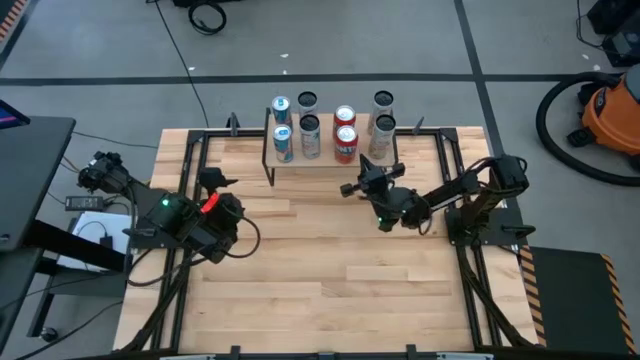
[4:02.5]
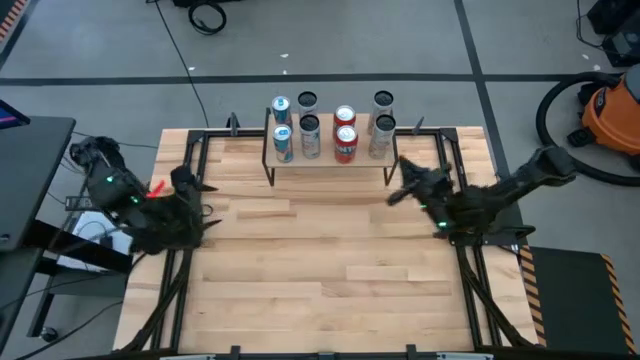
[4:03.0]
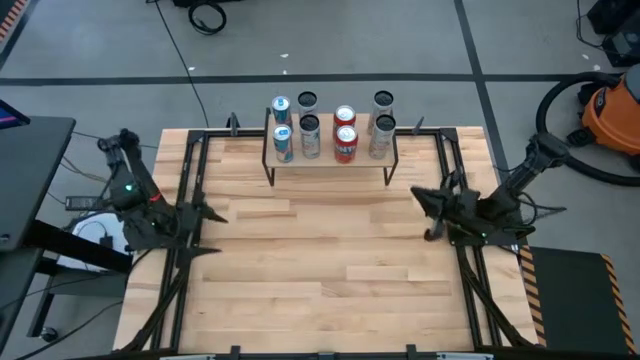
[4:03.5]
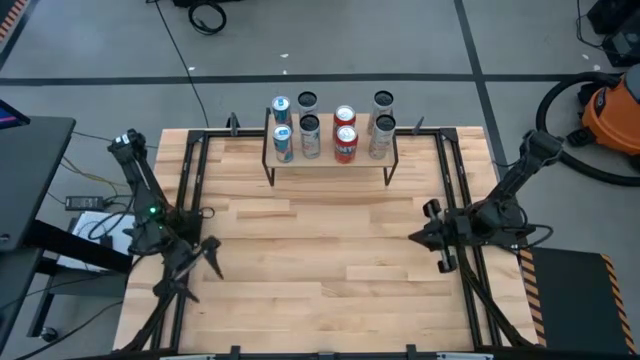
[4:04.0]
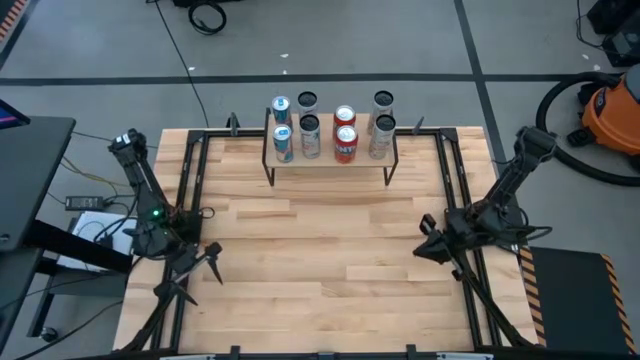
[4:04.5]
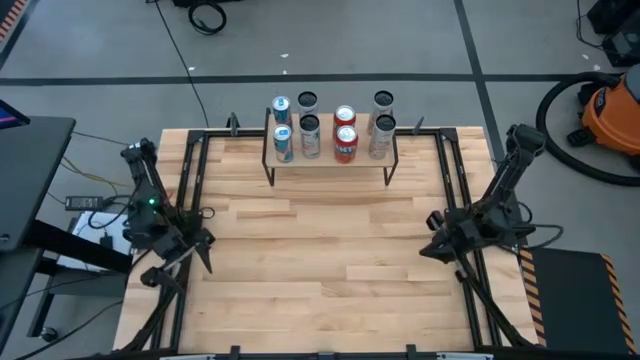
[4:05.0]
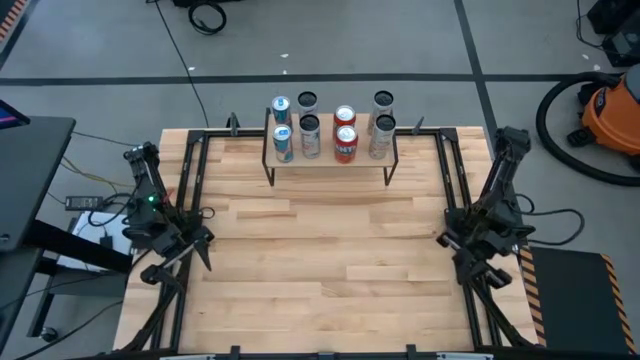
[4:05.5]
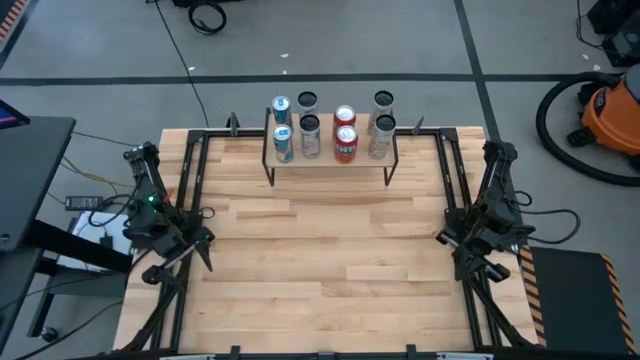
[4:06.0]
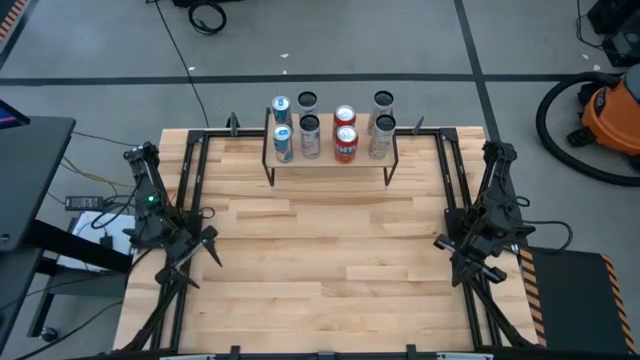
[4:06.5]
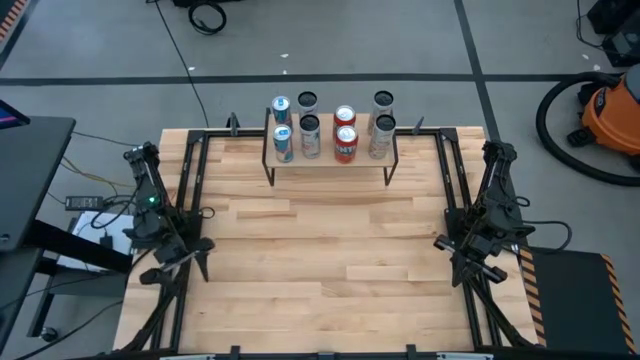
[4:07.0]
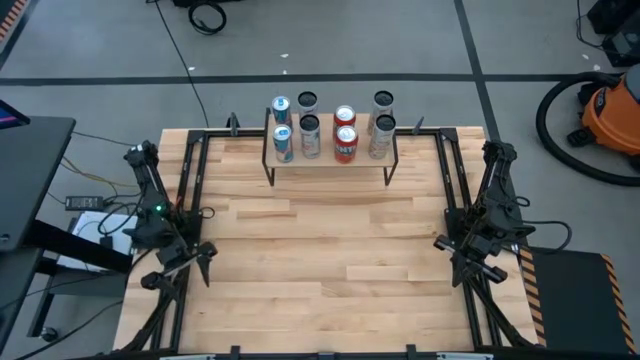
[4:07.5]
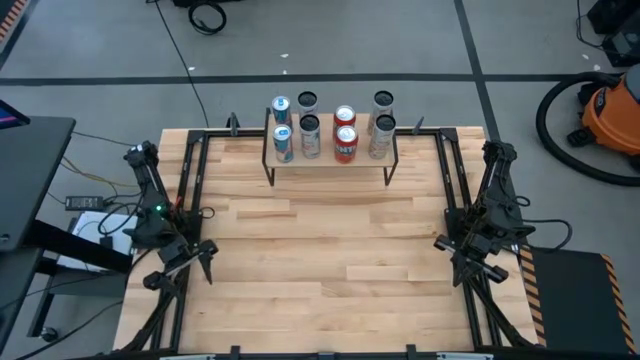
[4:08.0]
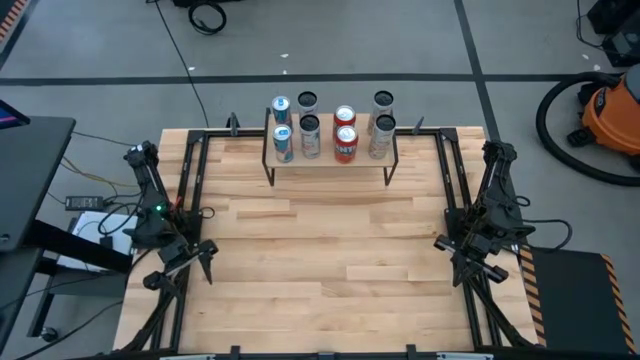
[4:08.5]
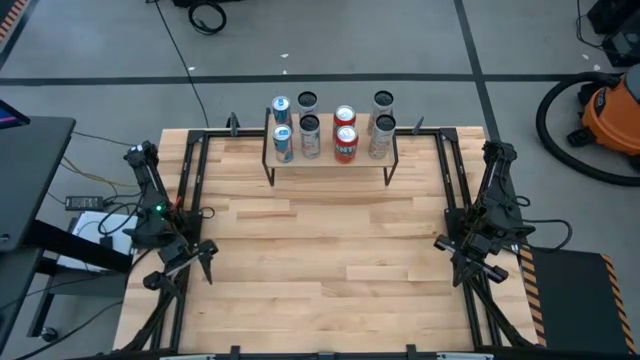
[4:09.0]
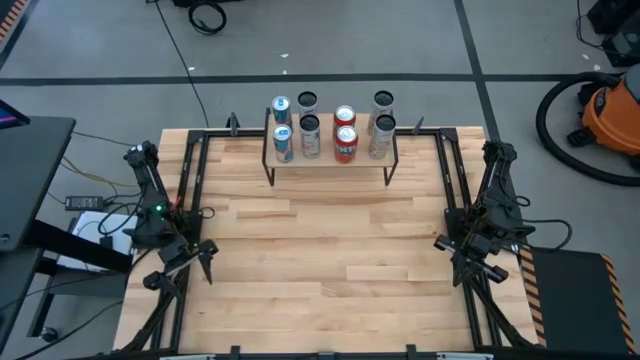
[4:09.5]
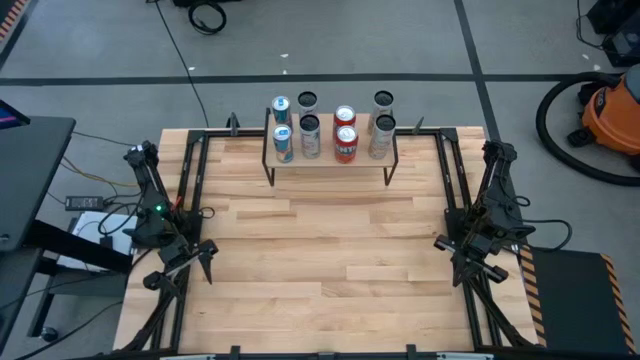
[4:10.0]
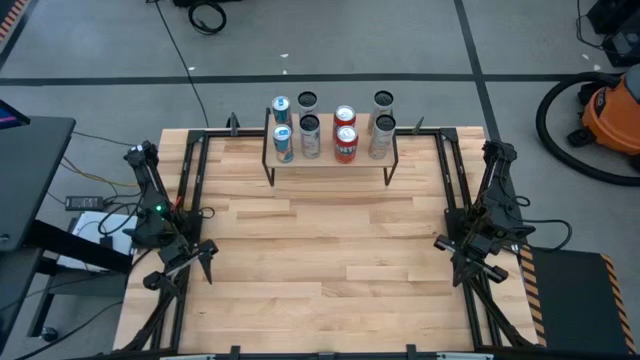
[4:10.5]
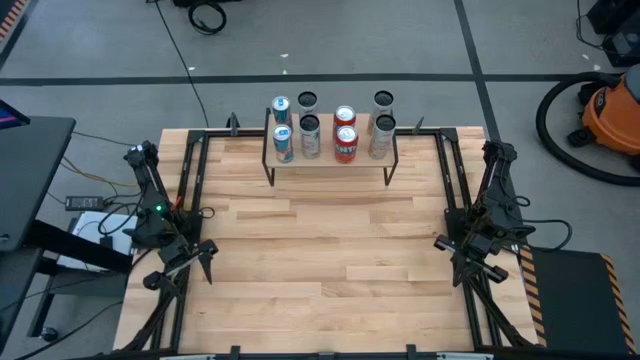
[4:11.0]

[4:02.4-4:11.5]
Task: Place canned beverage on shelf
Return to Home Position

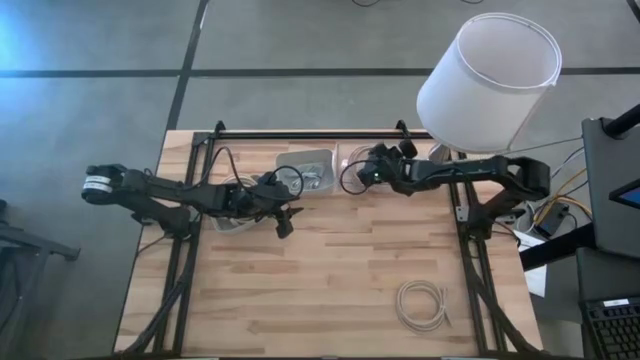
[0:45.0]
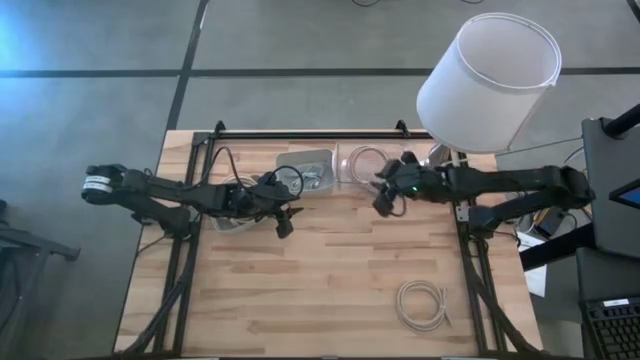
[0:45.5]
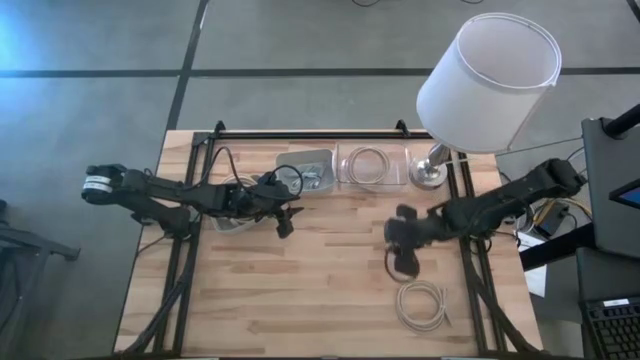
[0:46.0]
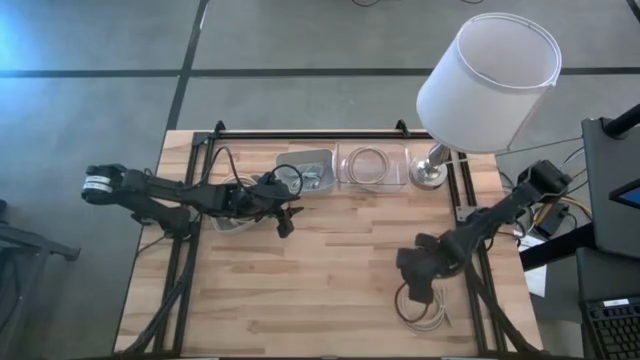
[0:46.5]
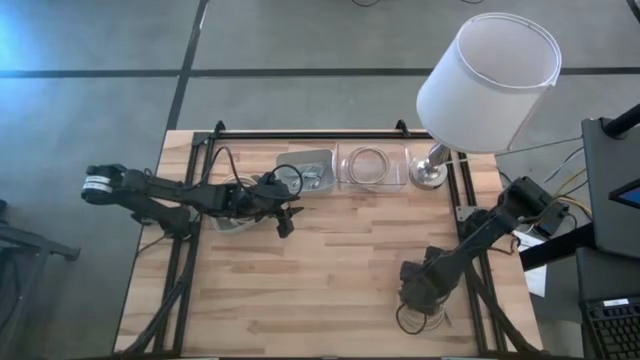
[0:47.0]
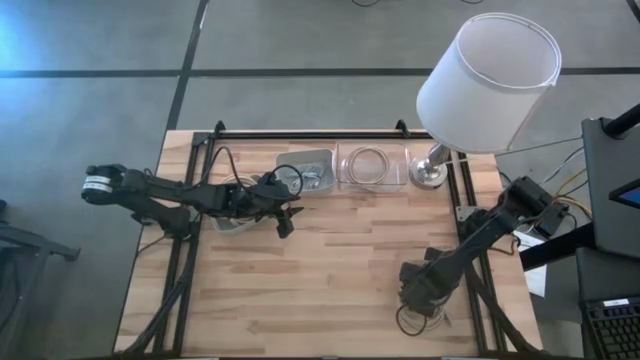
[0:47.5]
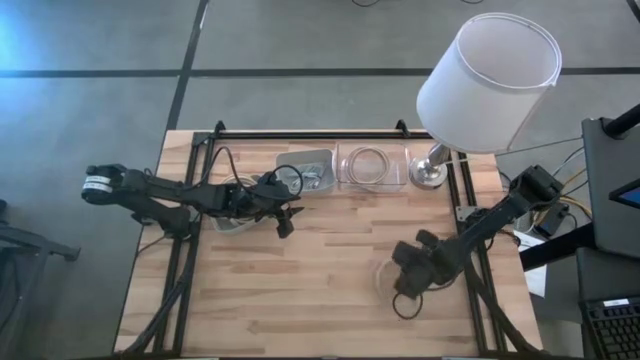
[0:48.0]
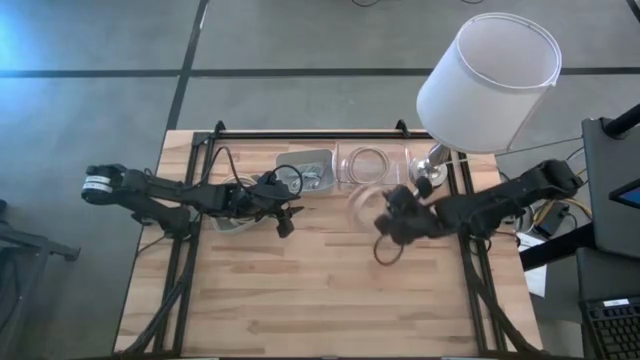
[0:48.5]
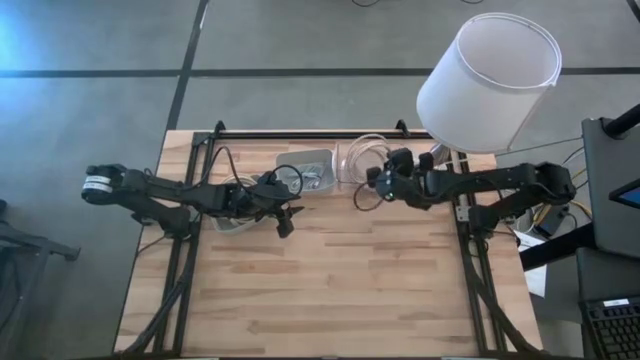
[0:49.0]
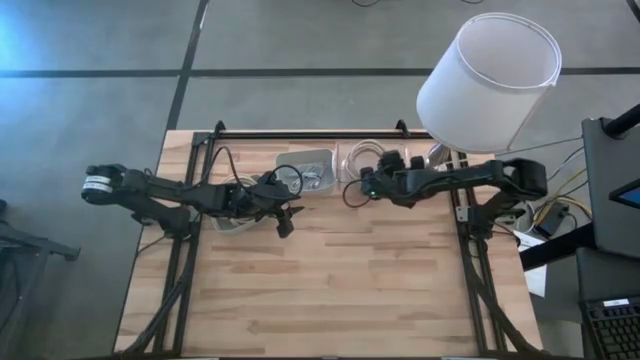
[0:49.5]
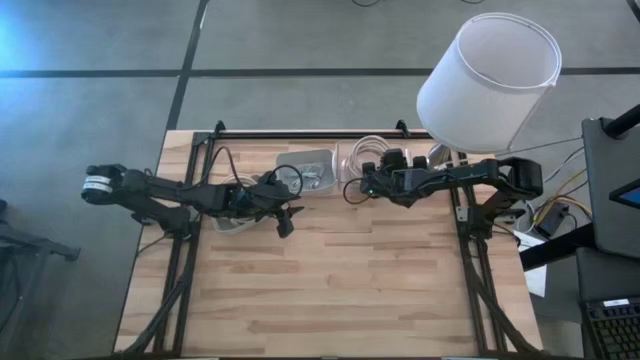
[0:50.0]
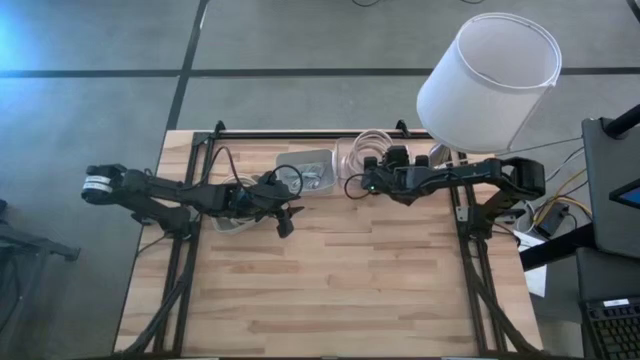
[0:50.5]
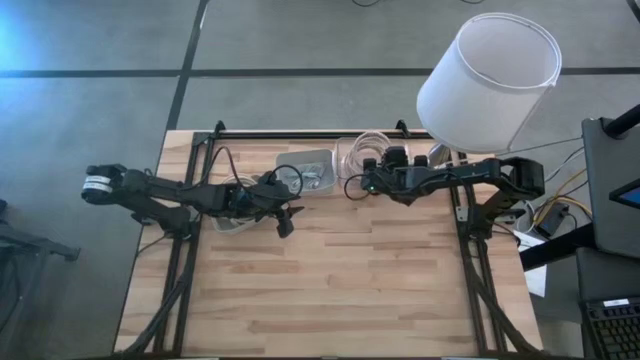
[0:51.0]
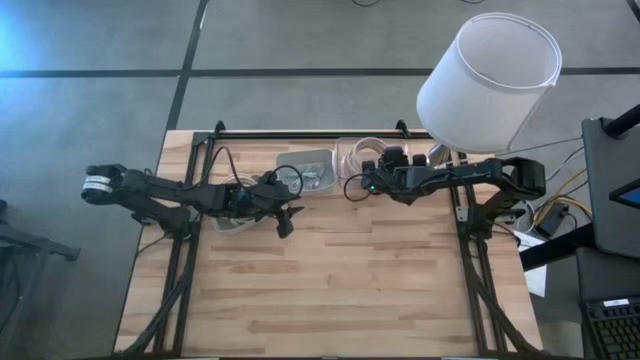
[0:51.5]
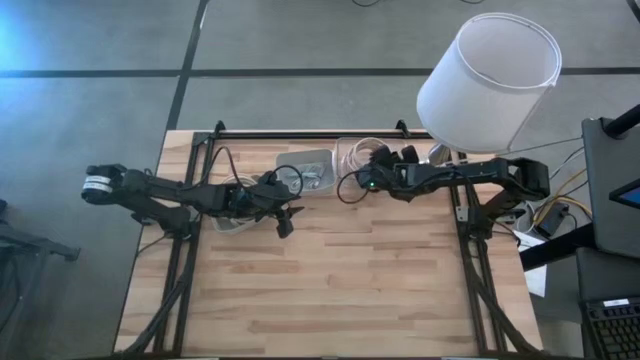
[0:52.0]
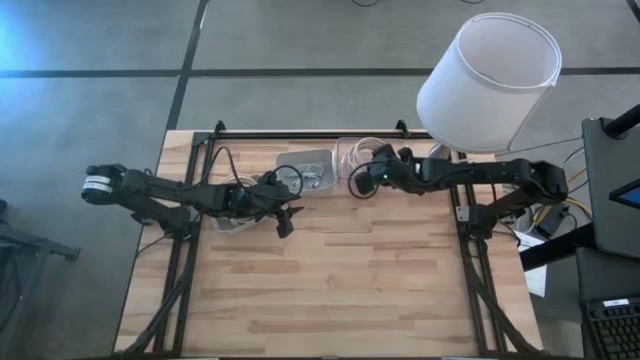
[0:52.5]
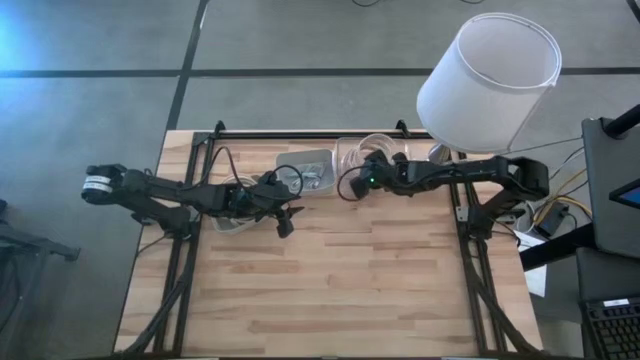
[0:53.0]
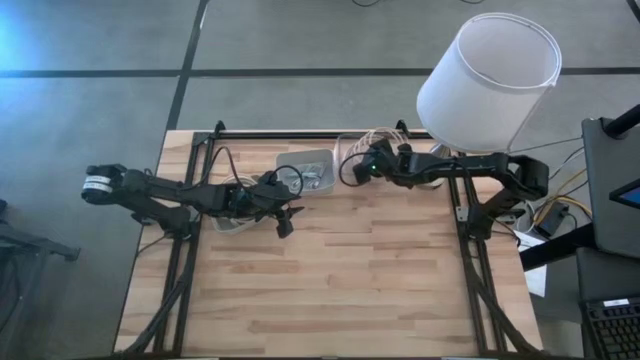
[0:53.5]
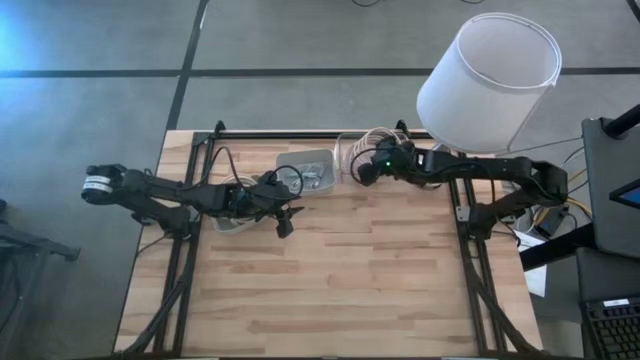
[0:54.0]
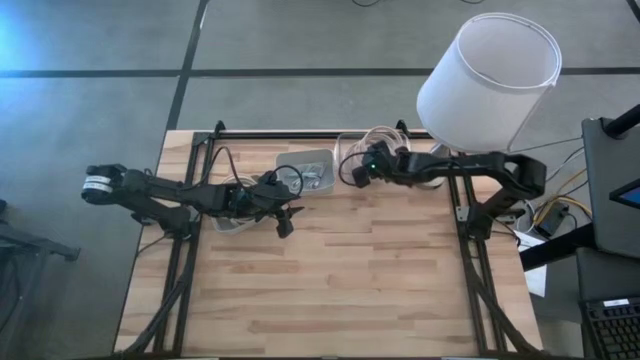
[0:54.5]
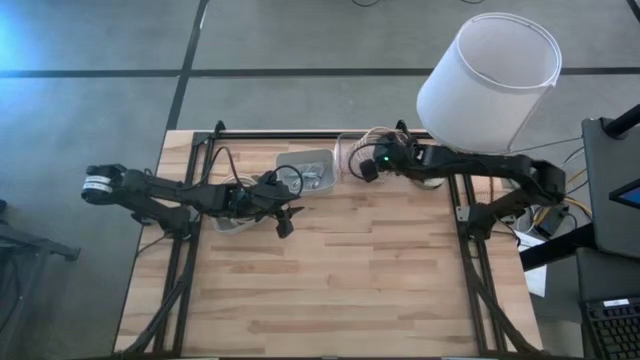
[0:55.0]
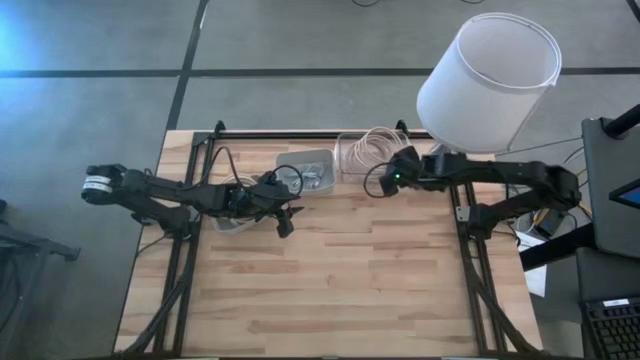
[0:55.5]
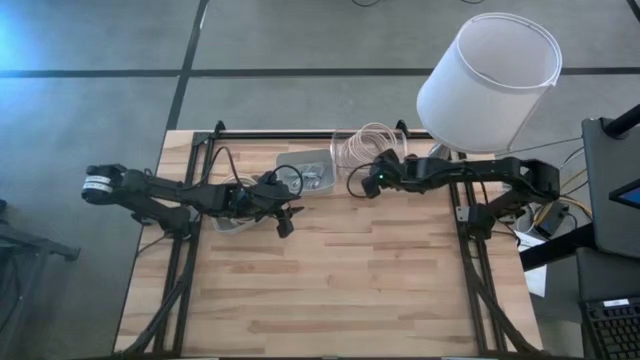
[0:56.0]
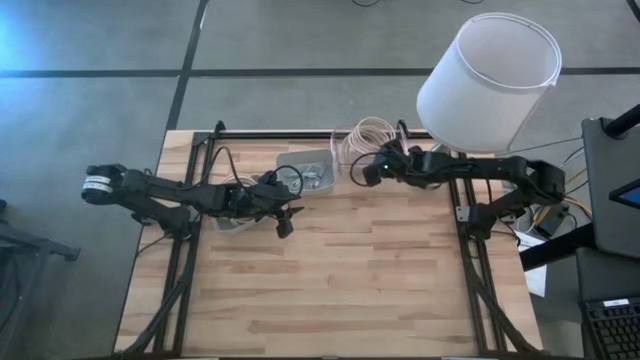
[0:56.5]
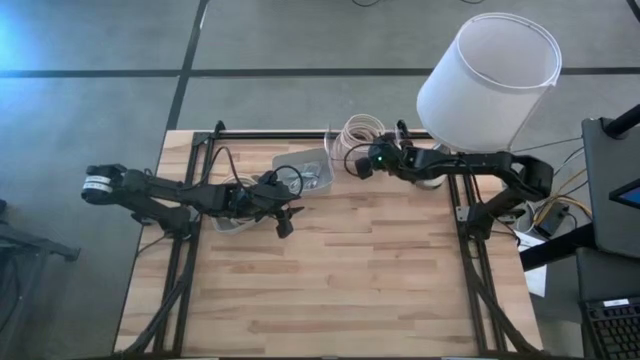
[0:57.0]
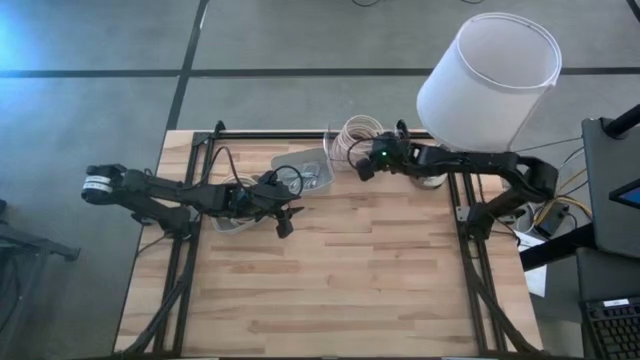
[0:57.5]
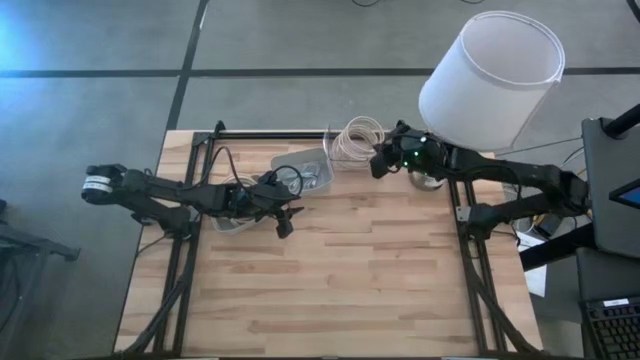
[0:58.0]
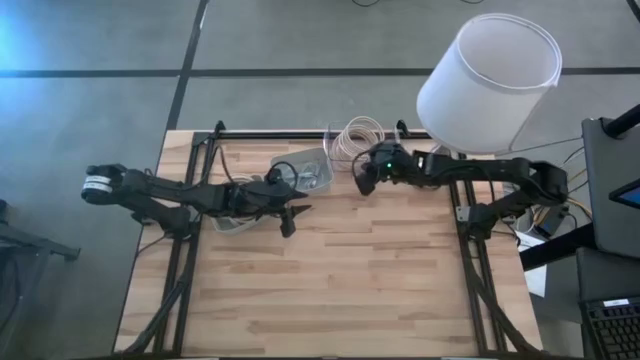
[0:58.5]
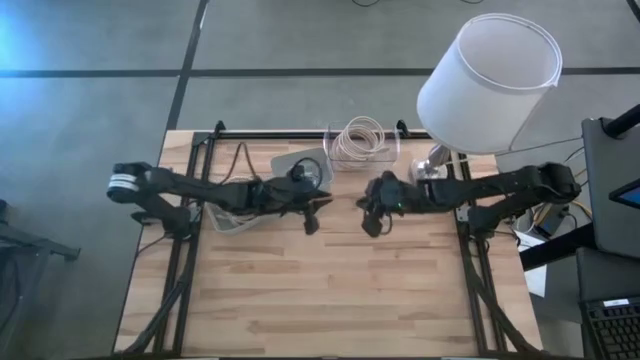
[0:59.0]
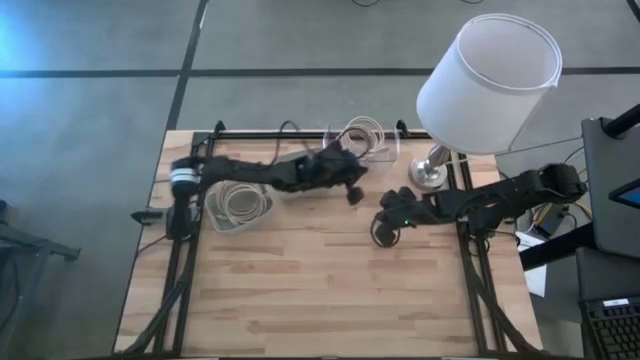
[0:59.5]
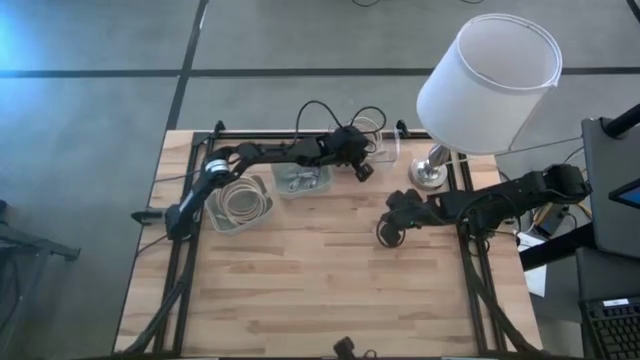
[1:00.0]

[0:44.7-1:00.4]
Task: Pick & Place USB Port
Put the light brown HDMI cable into the transparent bin
